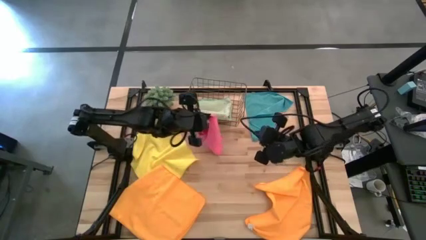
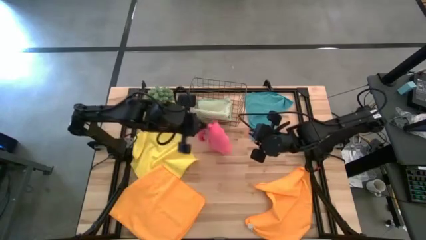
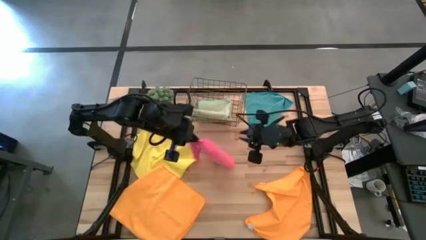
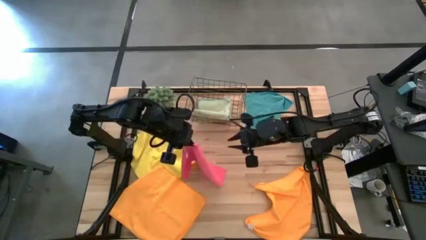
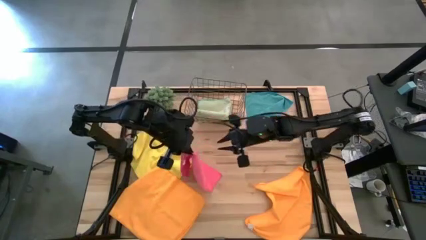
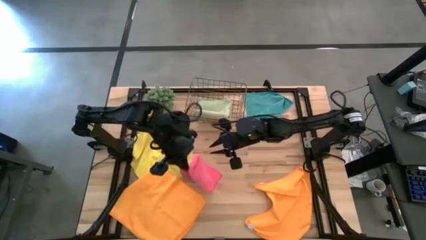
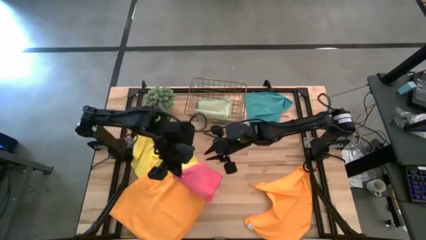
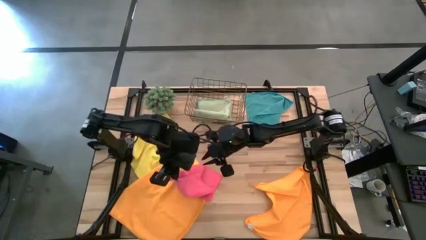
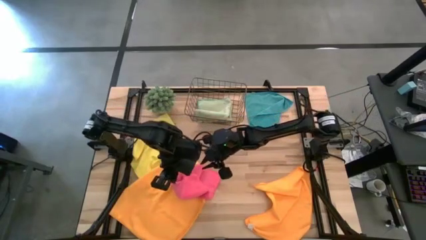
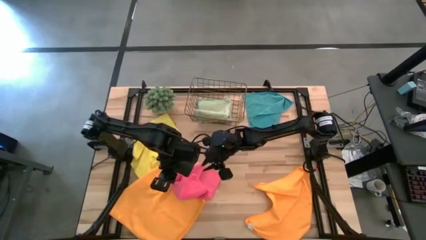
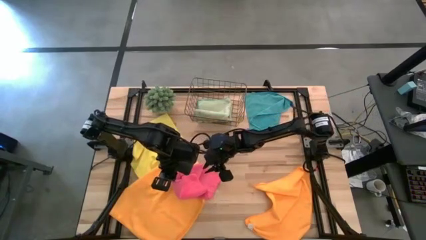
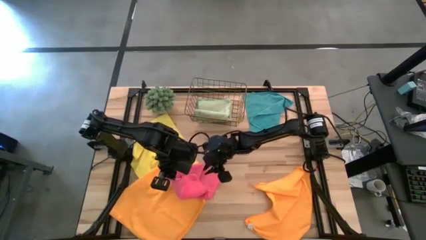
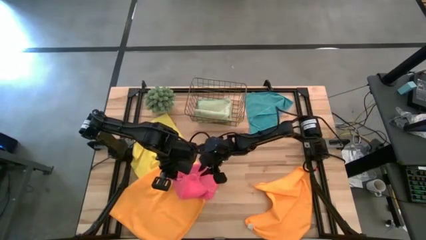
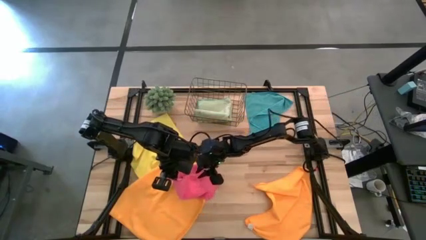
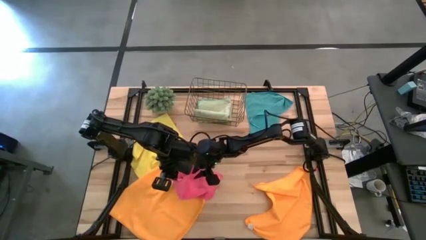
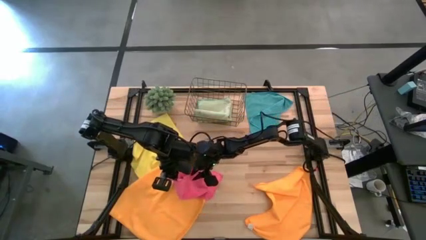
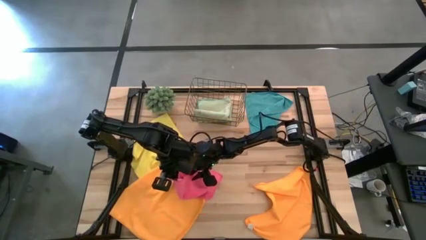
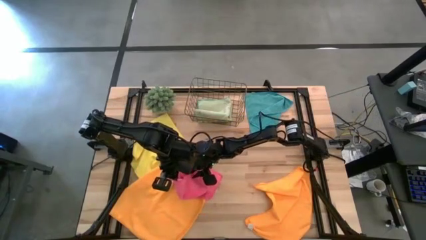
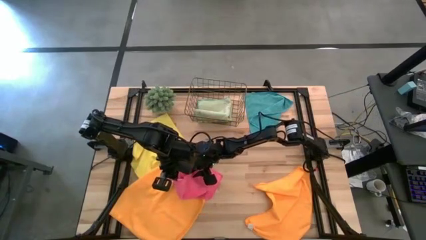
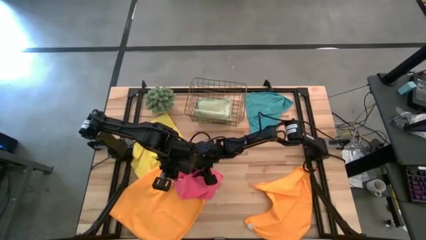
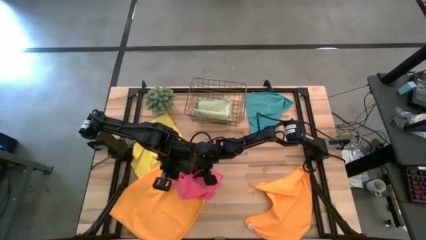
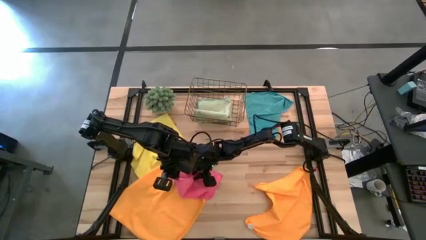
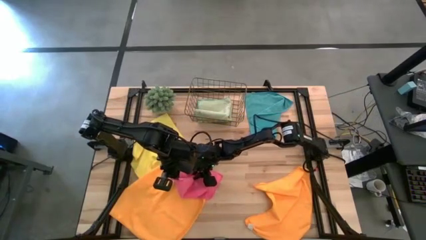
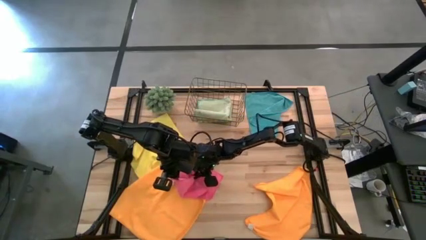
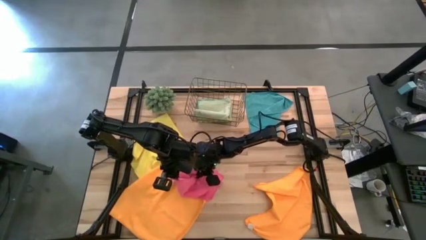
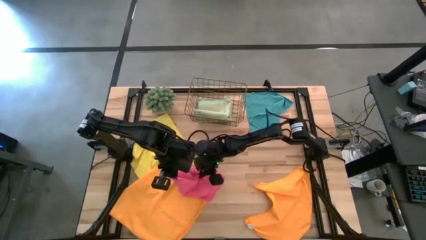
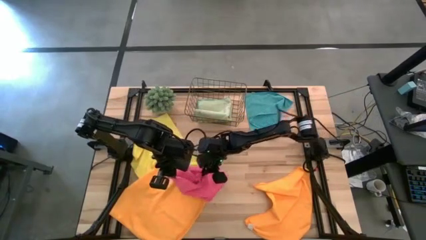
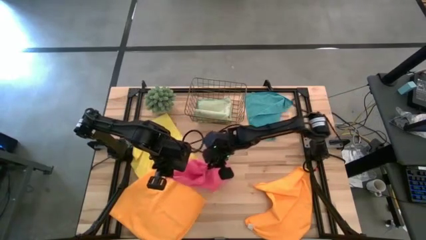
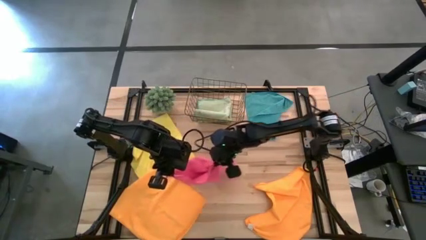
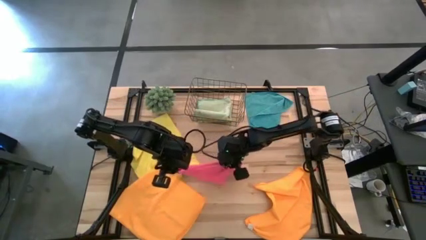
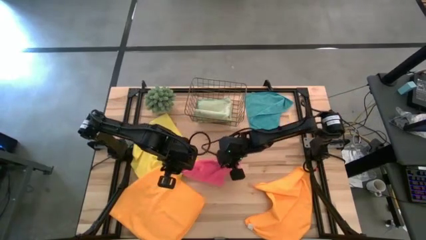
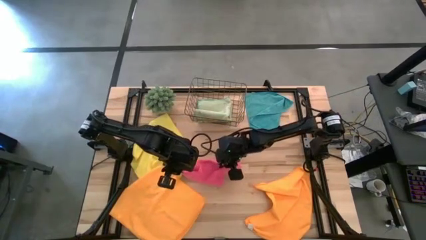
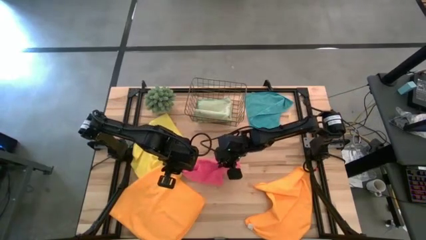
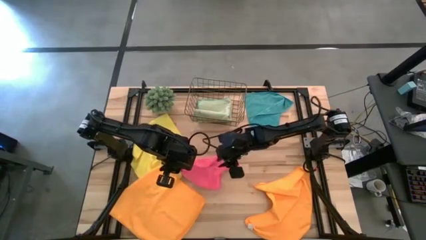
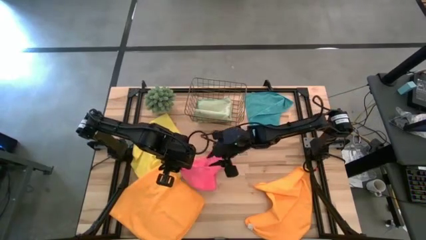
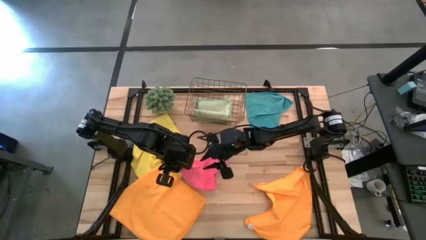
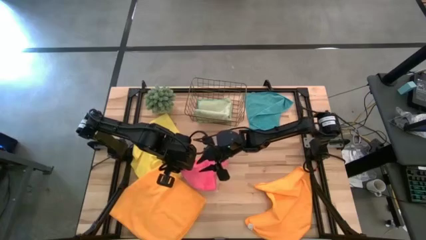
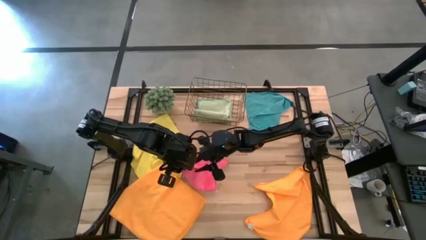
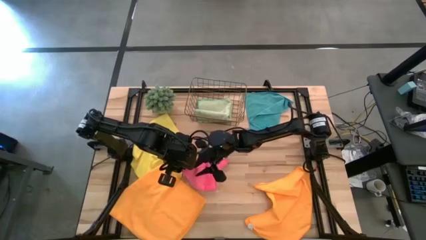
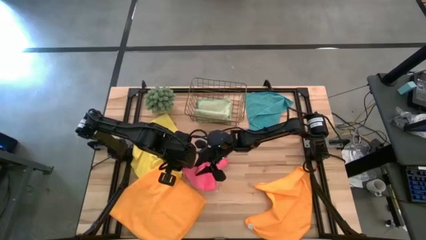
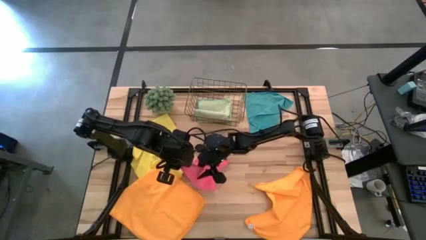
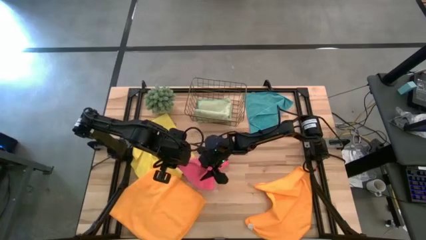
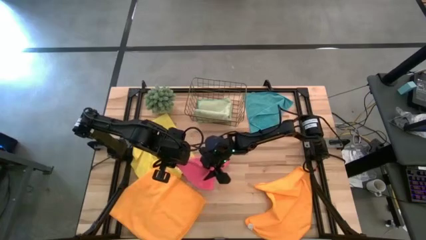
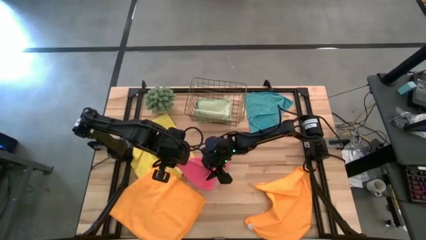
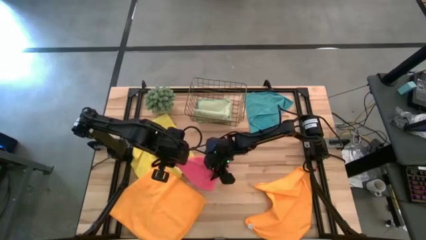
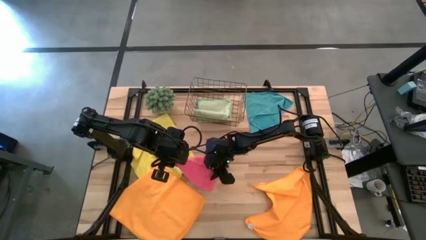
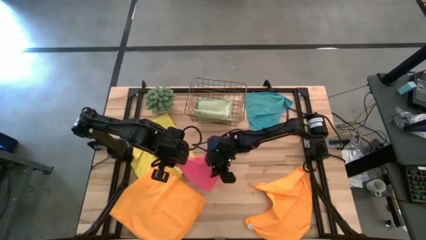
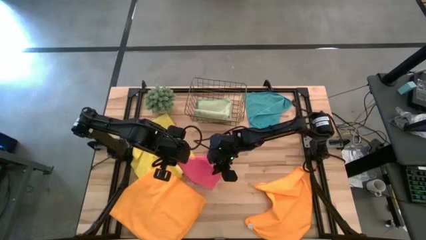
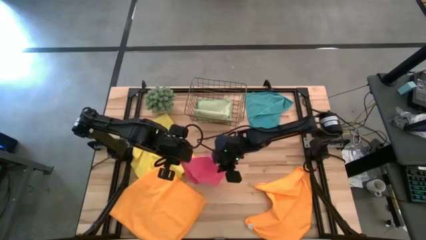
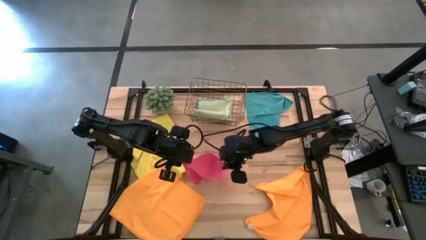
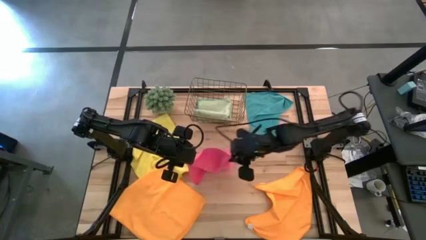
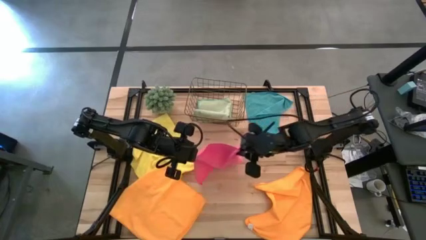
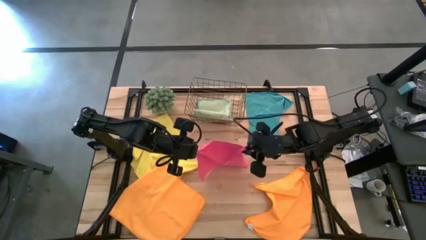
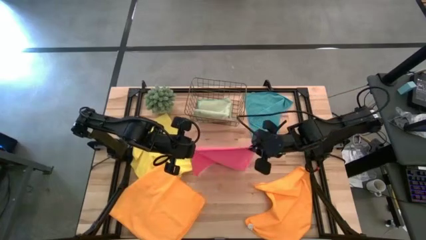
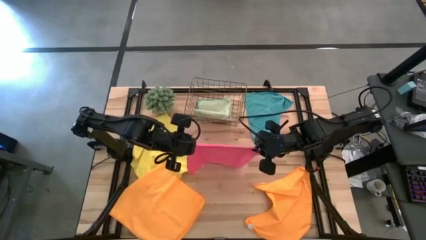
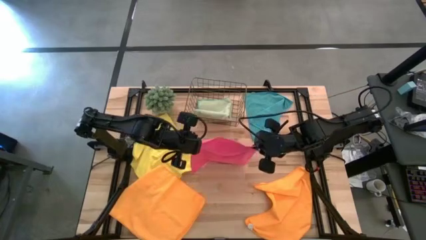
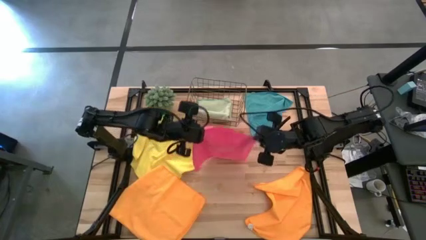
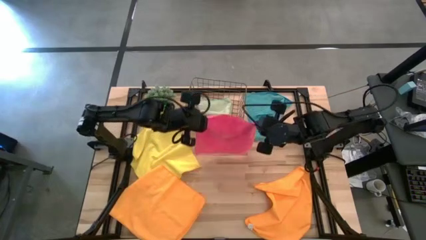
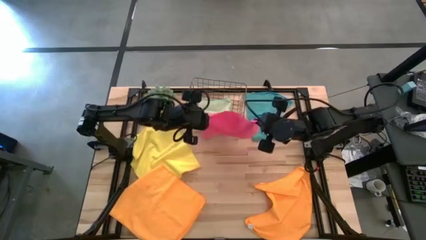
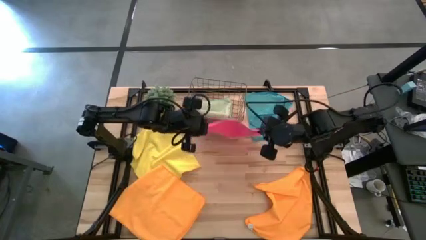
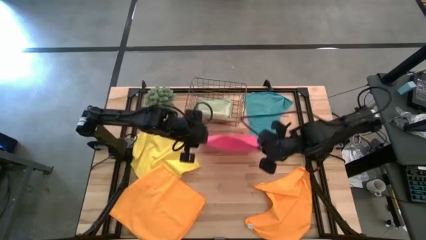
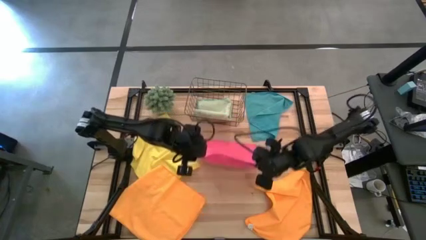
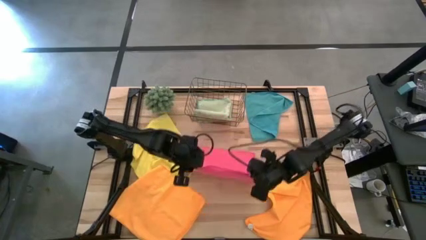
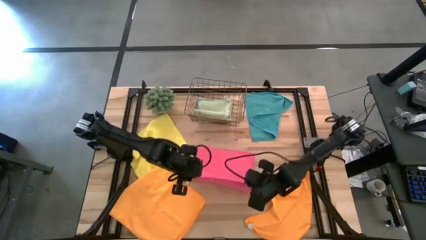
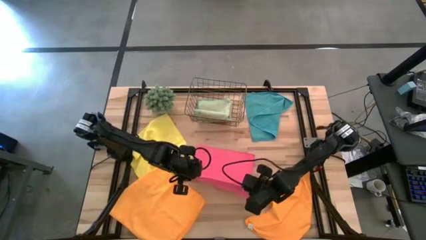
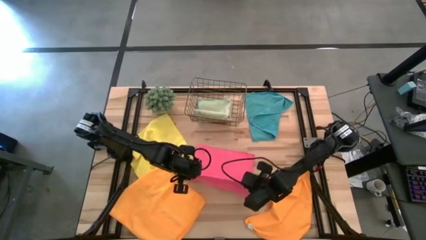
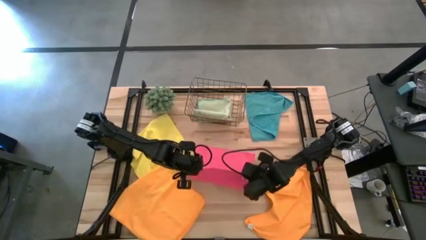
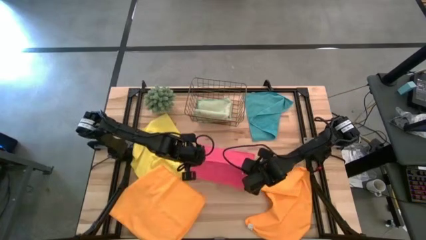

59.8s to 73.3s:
Task: Fold microfiber towels
Fold the pink towel
